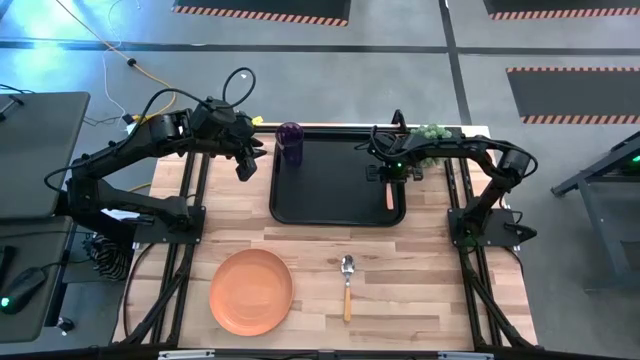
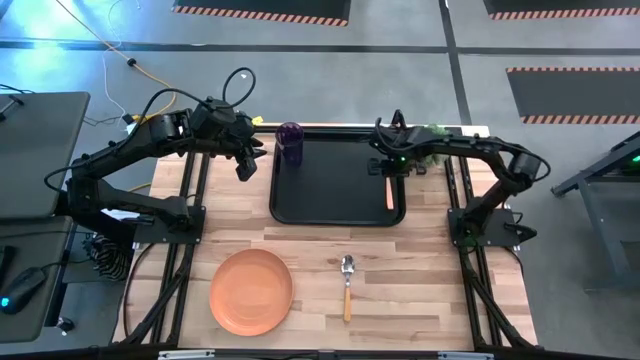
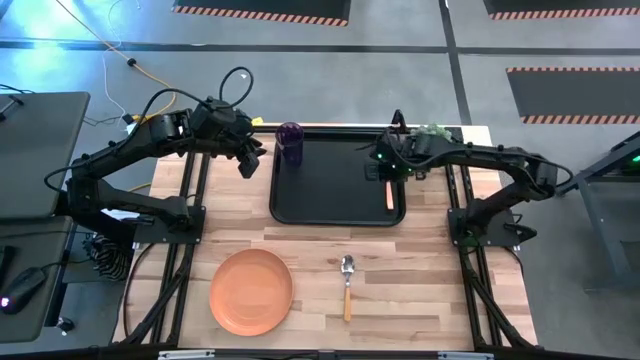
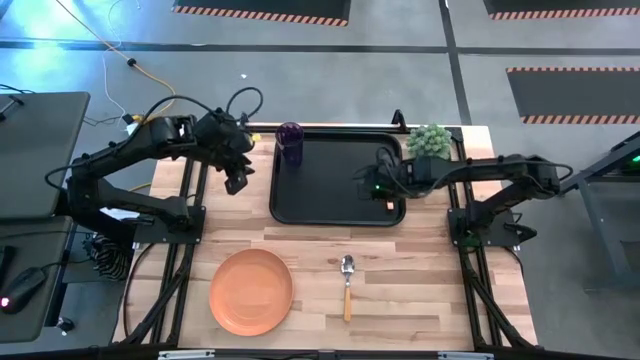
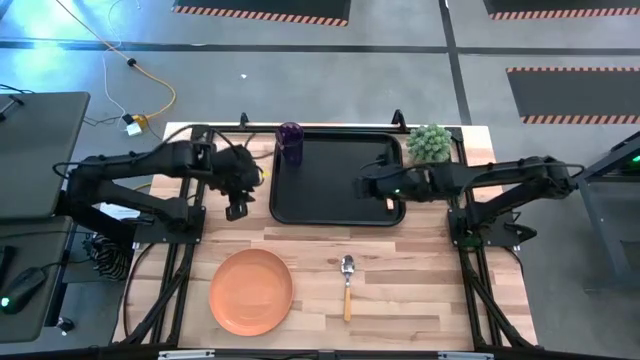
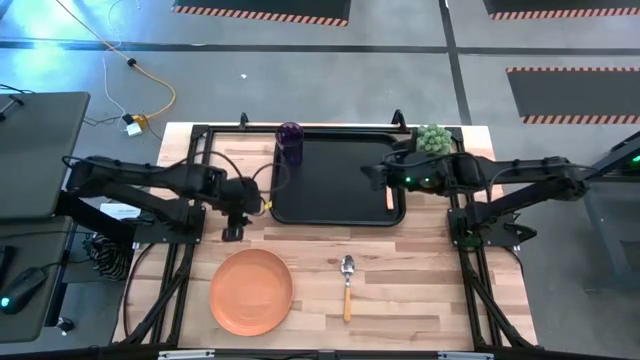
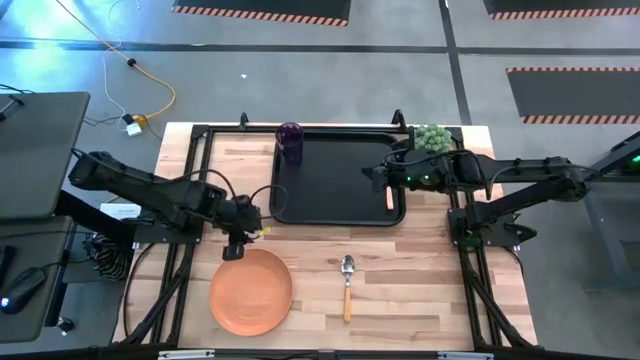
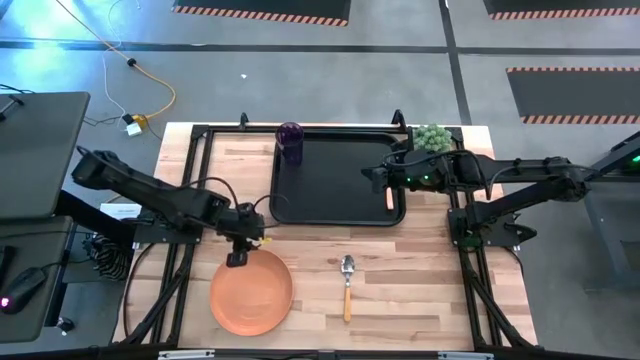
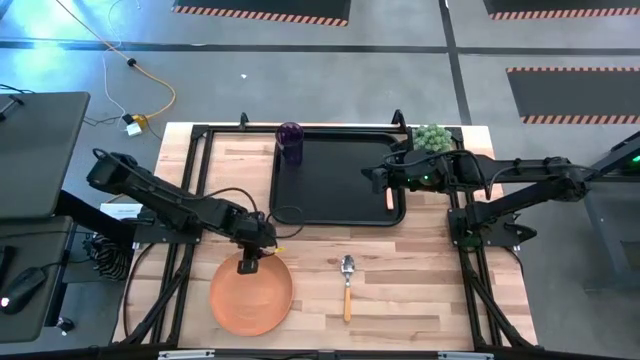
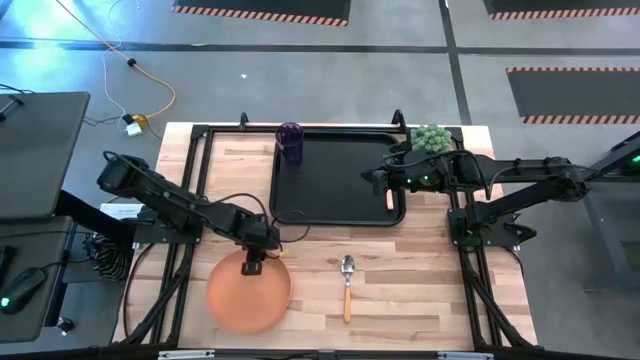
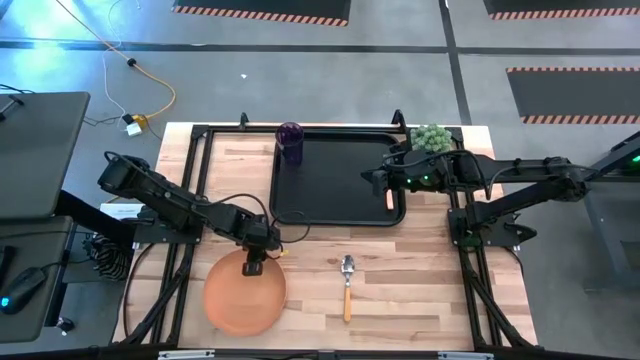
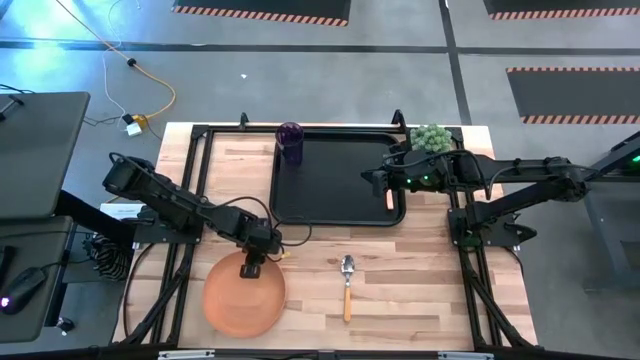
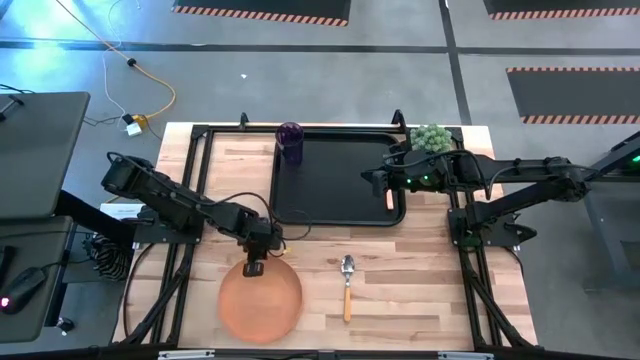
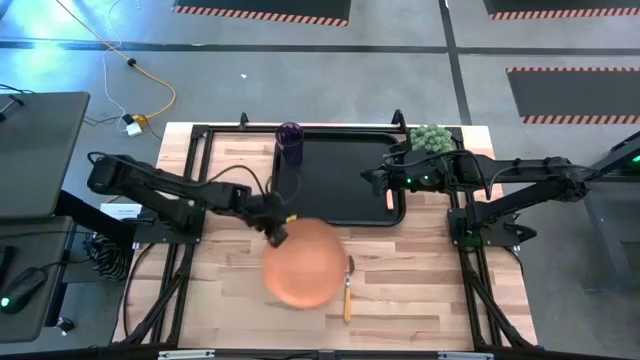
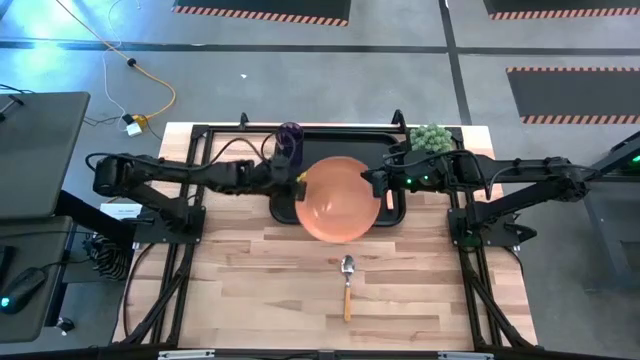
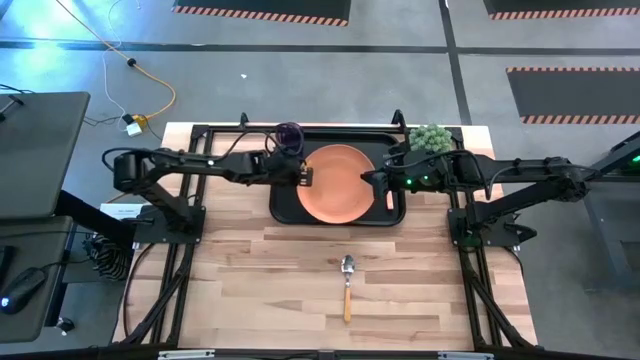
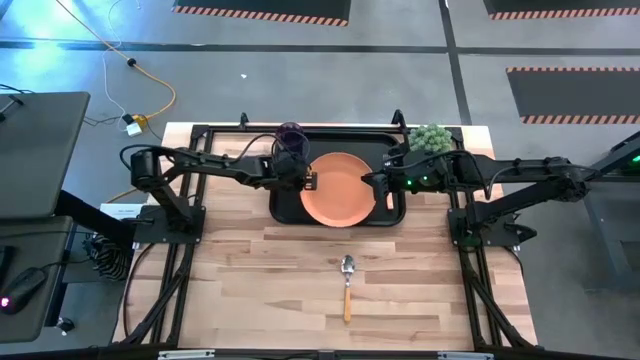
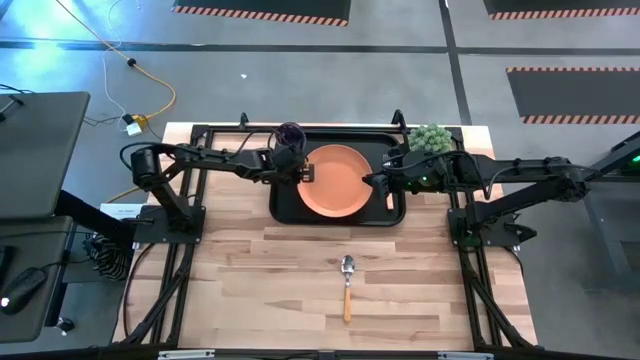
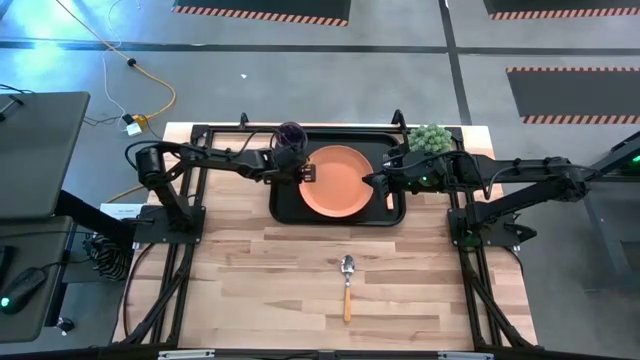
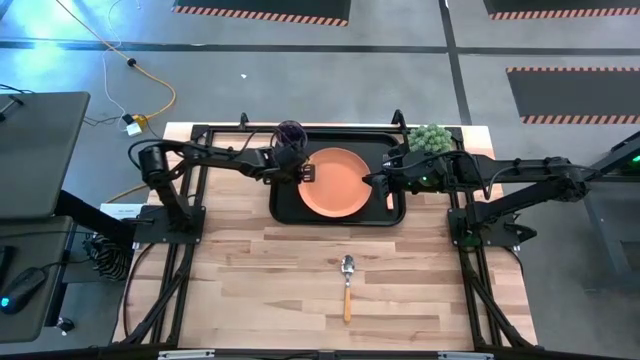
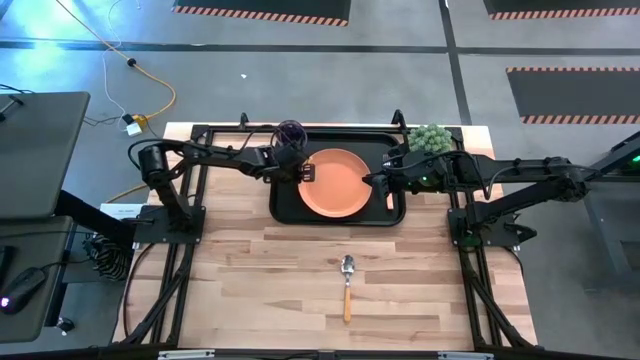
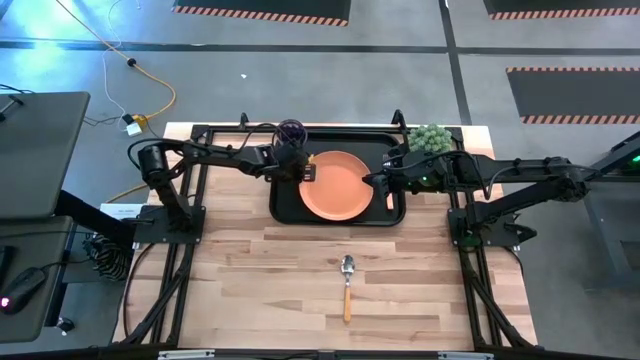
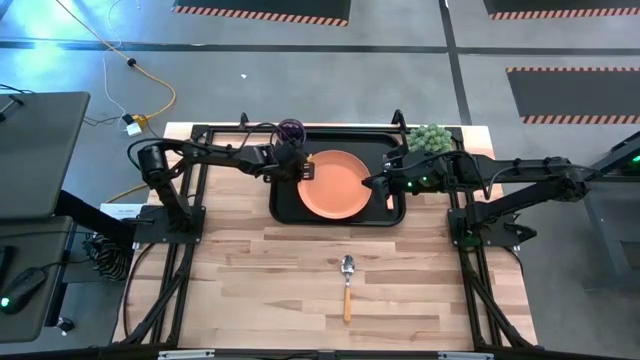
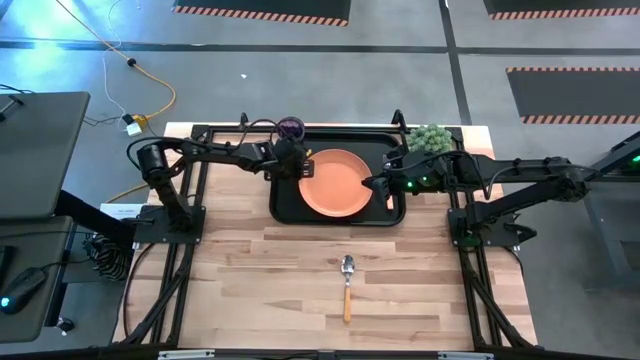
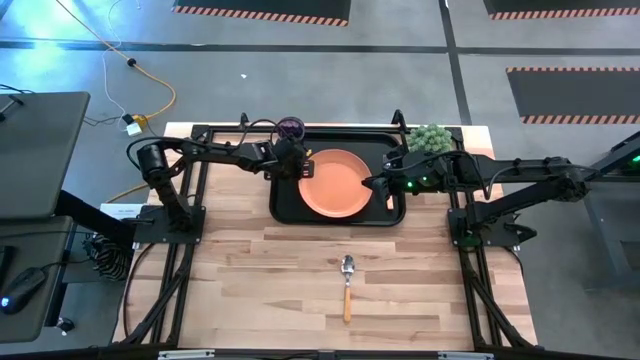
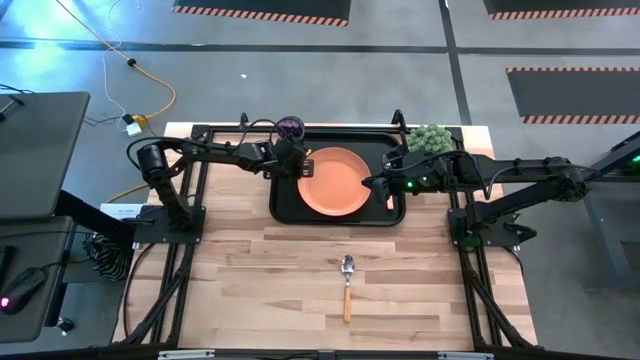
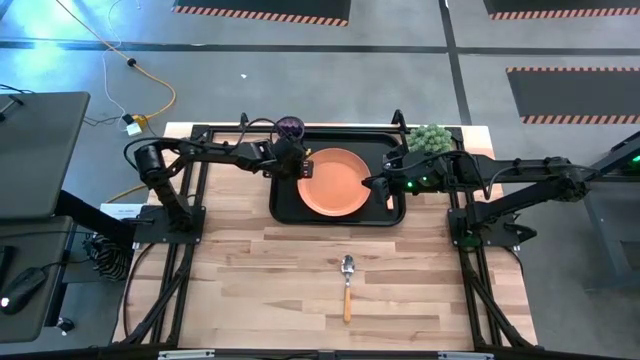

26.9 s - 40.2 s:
Task: Pick and place plate/cup/fork/spoon on tray
Put the orange plate to the left of the orange fork on the black tray

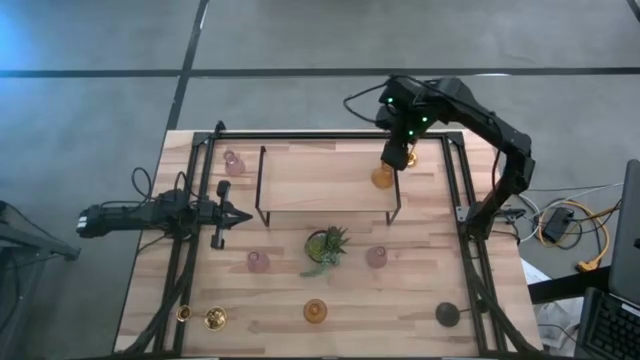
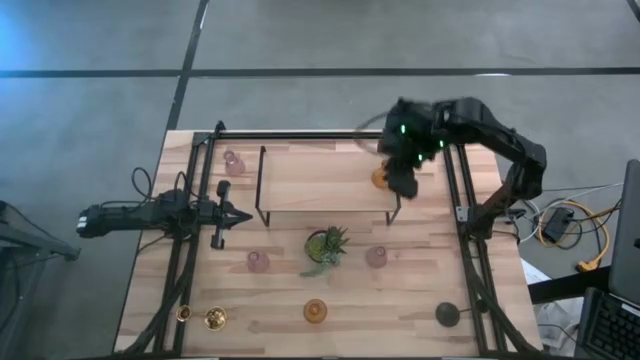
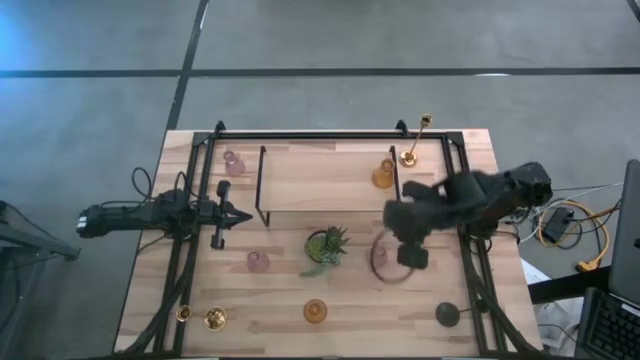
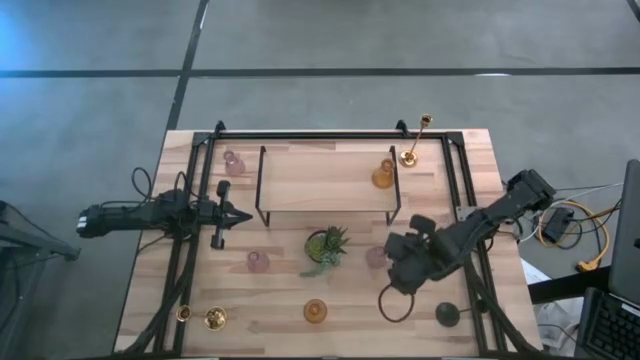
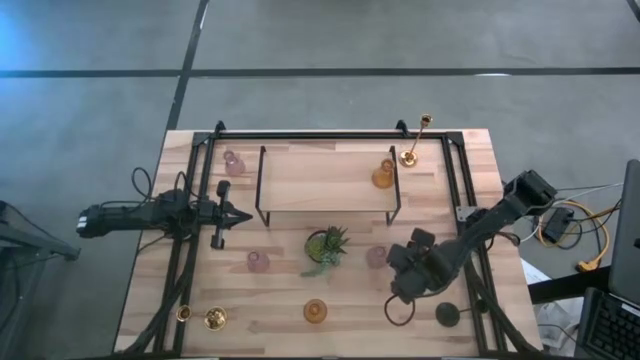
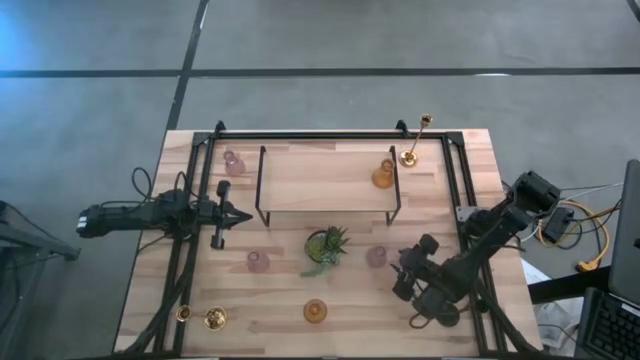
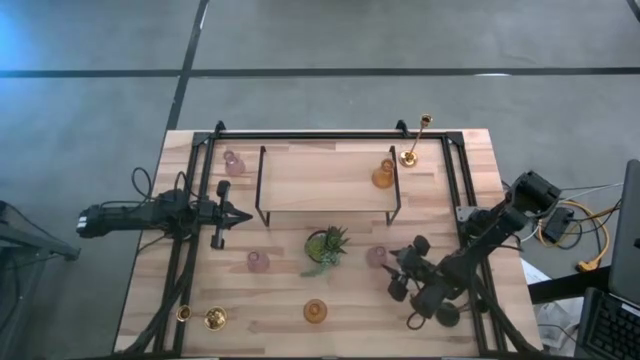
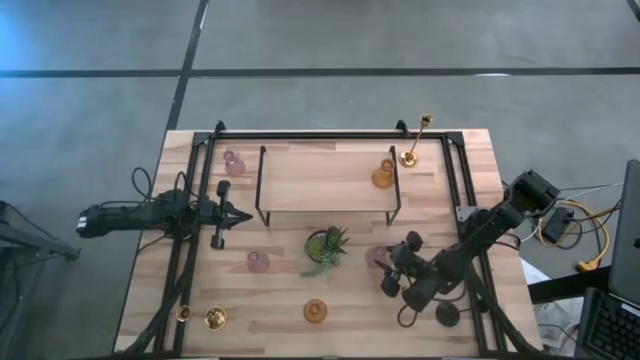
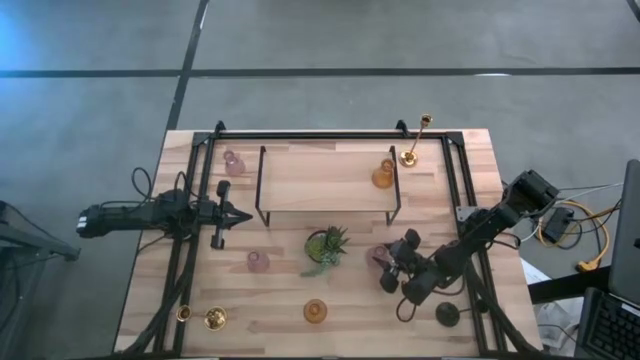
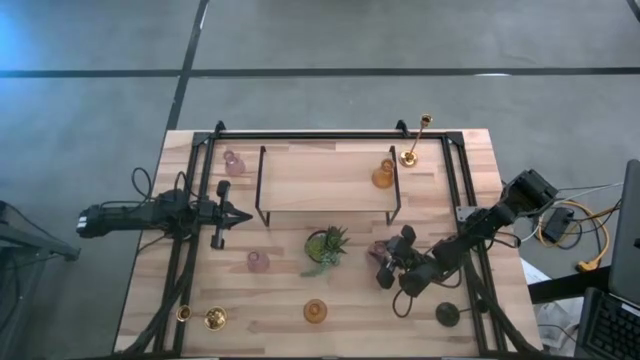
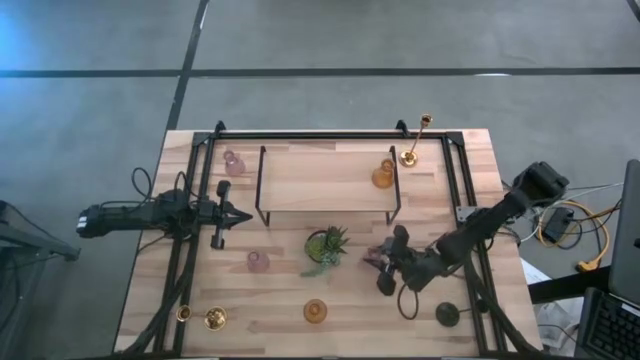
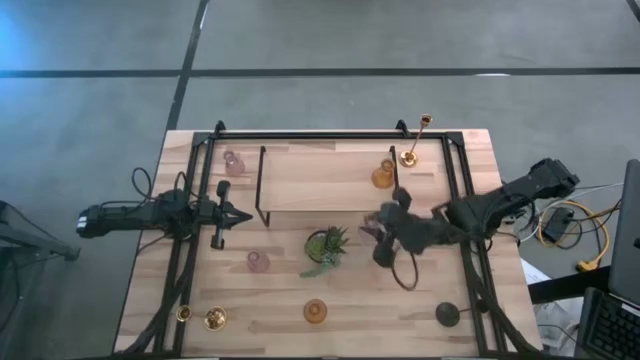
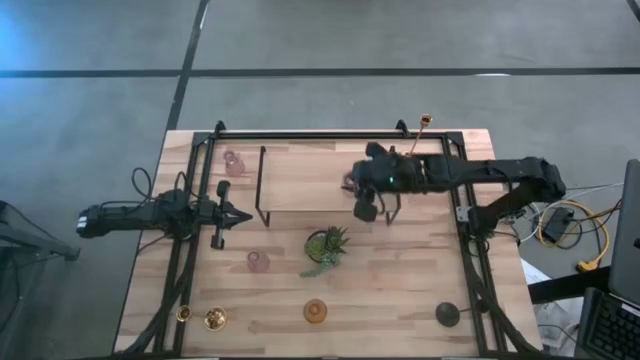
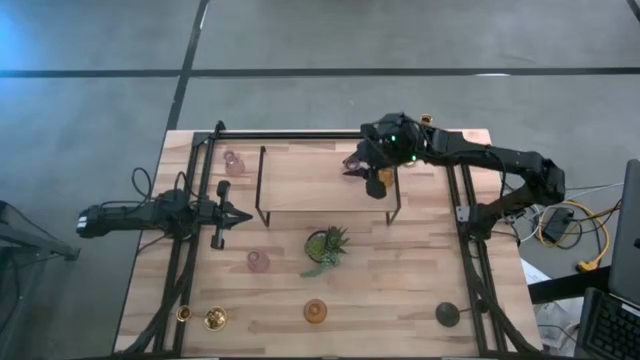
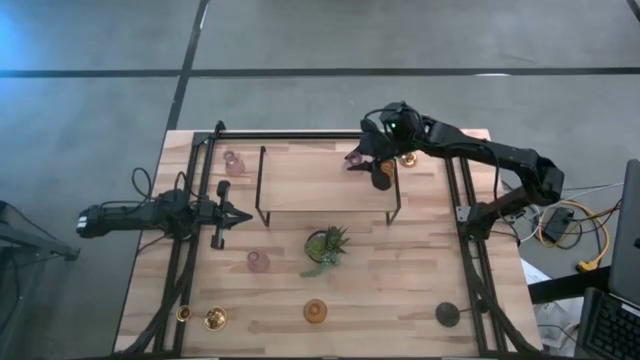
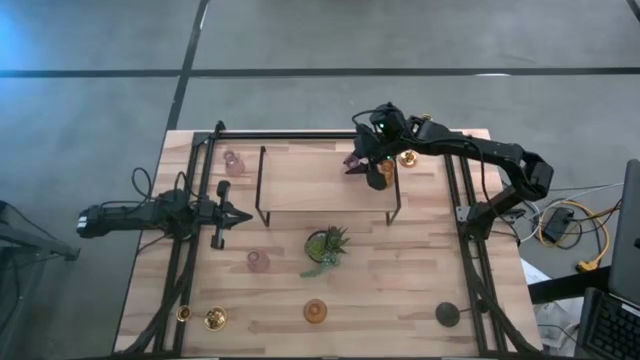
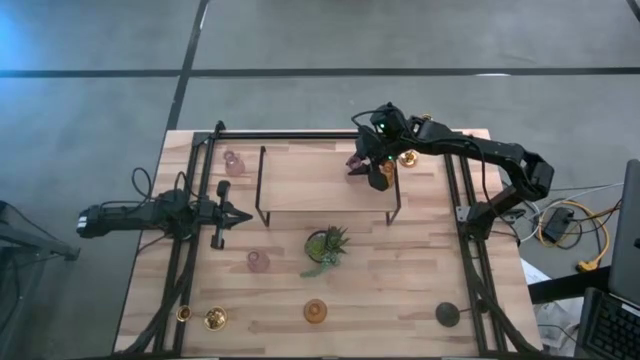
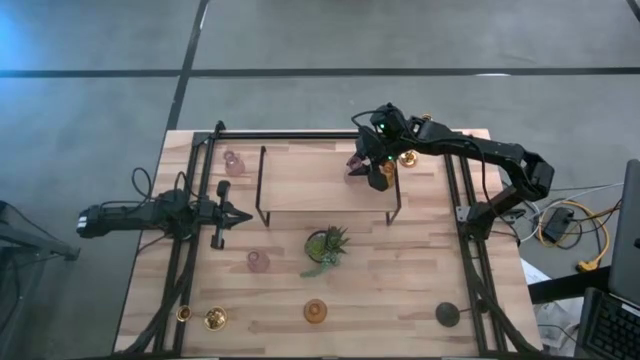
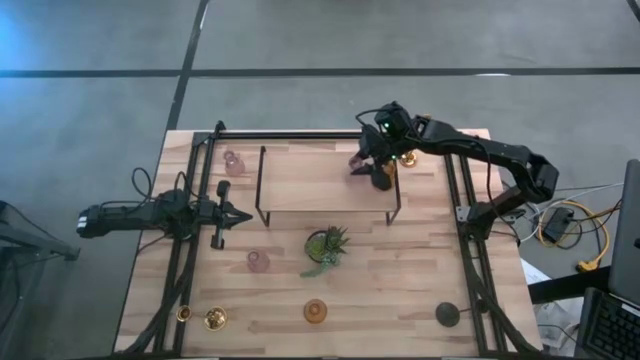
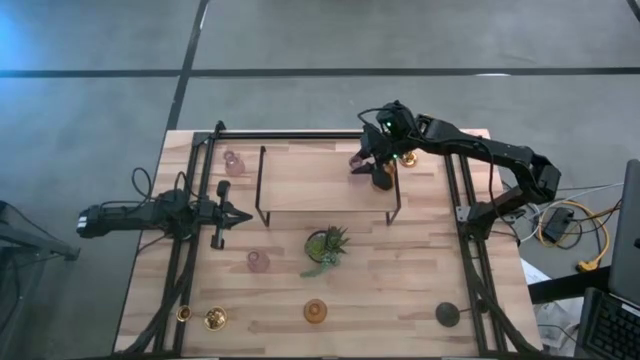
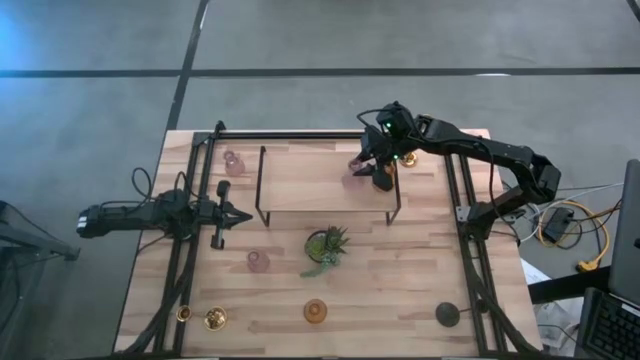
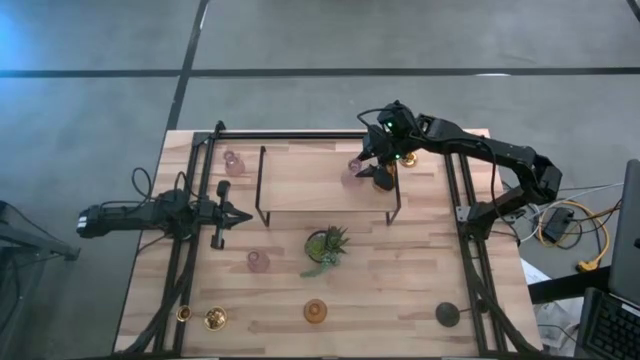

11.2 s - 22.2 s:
Task: Pick & Place candle stick holders
Put the pink glass candle holder on the shelf
